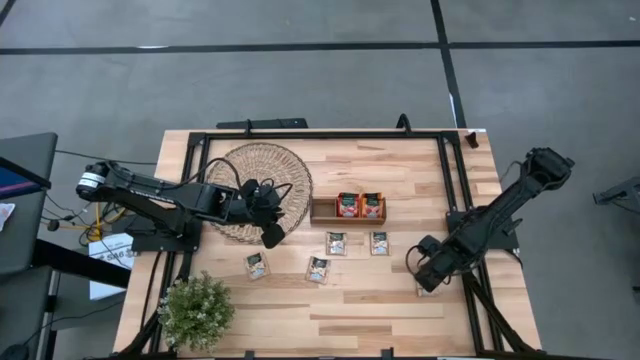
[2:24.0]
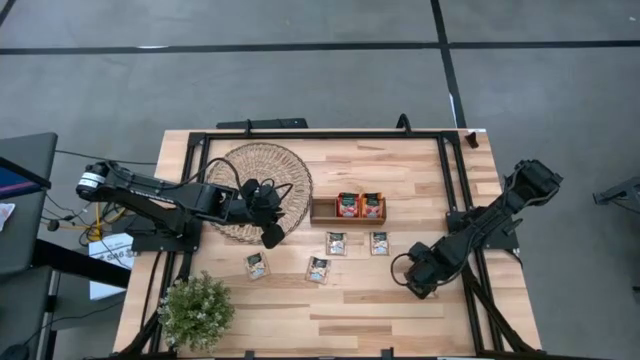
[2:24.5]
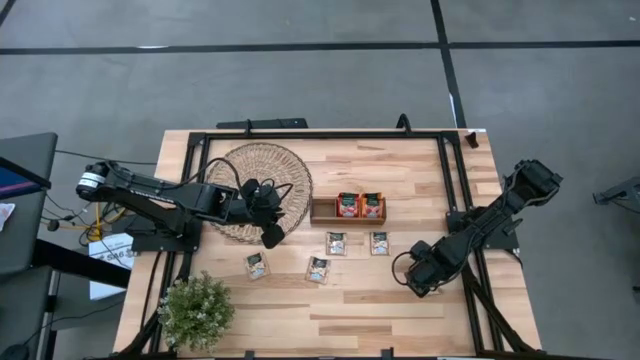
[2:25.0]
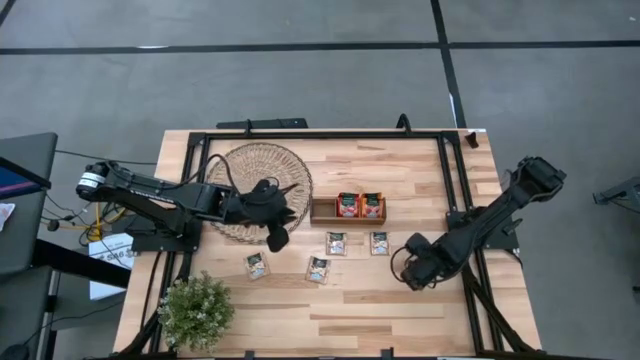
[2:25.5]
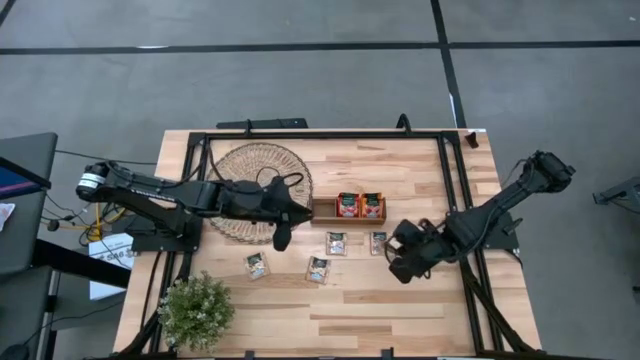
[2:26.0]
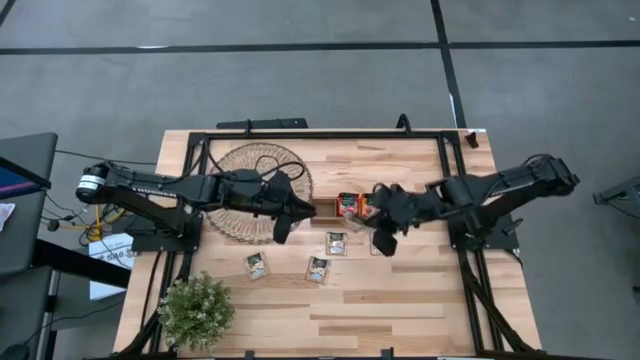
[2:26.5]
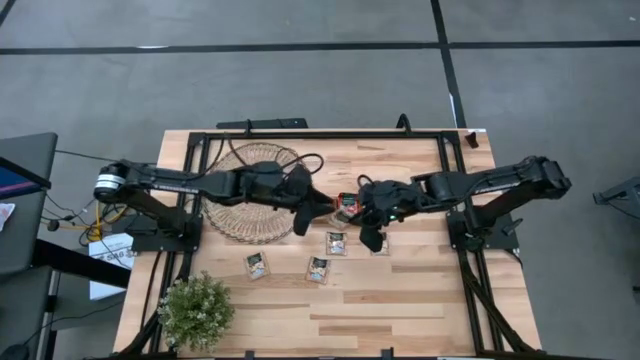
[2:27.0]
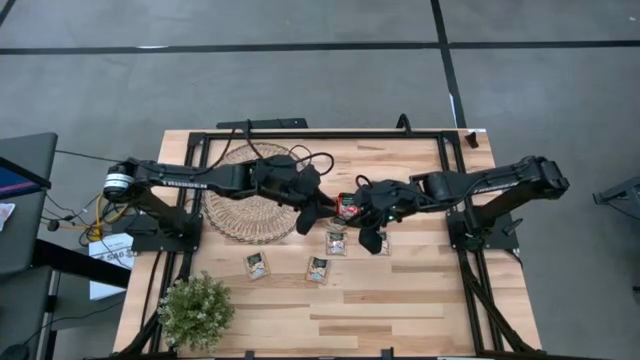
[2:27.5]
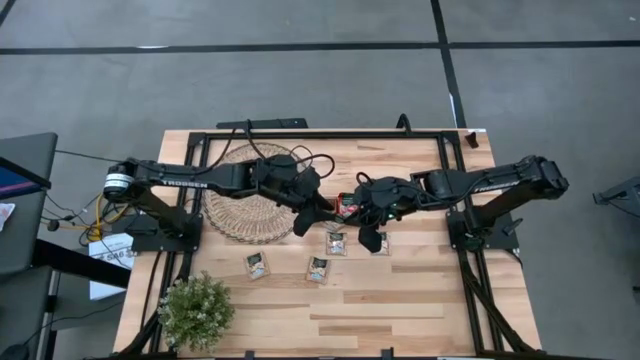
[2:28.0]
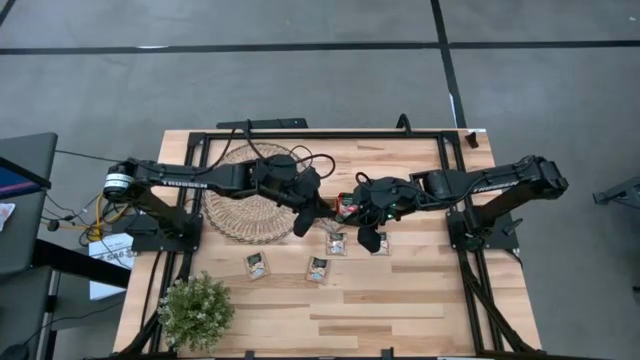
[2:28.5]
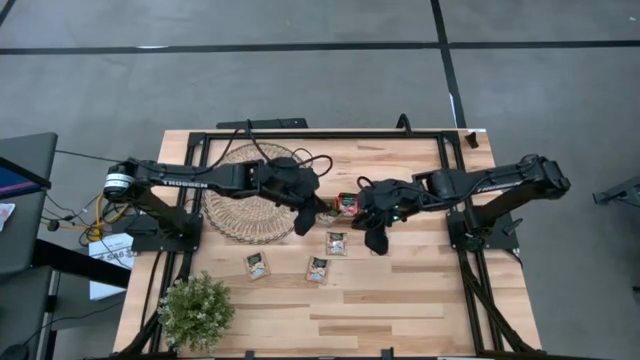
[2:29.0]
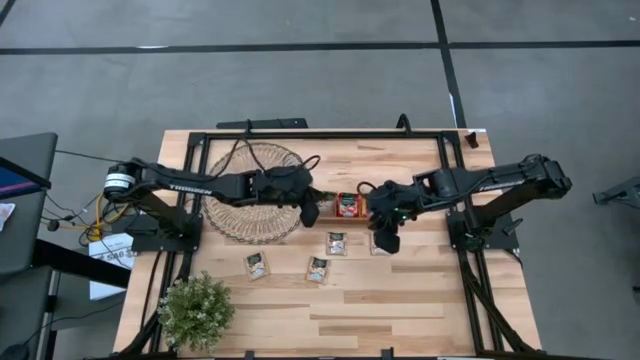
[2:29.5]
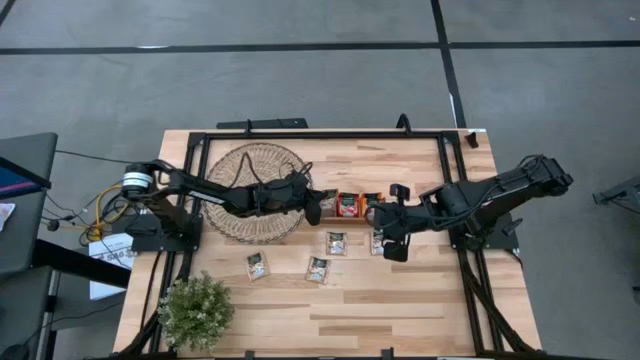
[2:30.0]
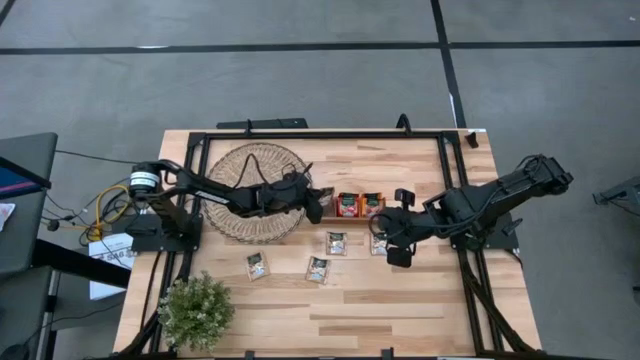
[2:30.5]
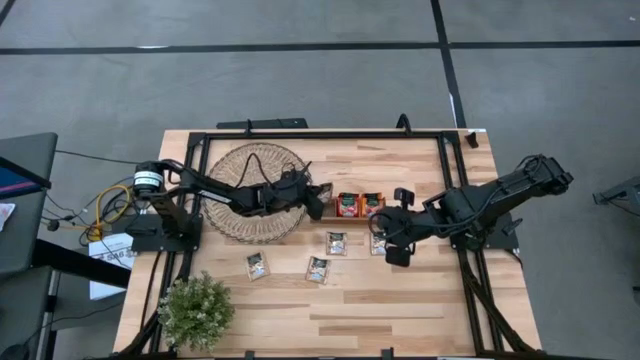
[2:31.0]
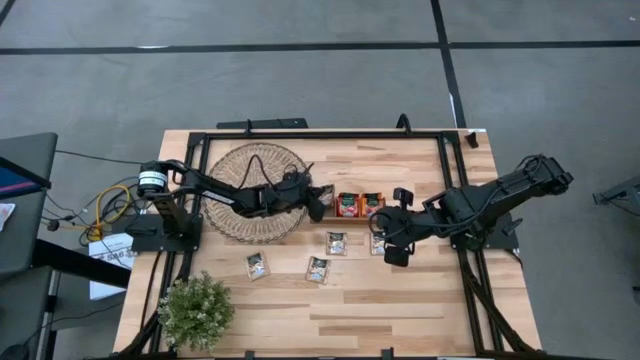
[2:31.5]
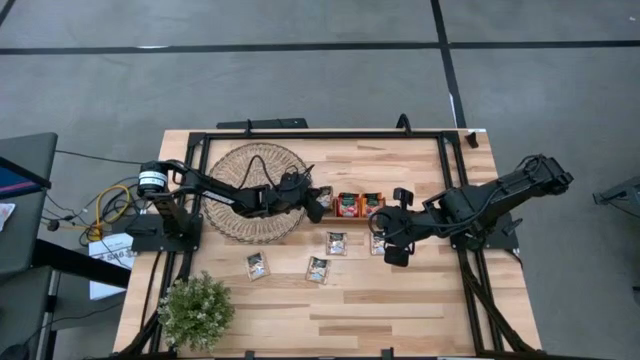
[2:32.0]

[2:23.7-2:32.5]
Task: Pick & Place Tea
Put the brown tea bag into the left section of the wooden organizer

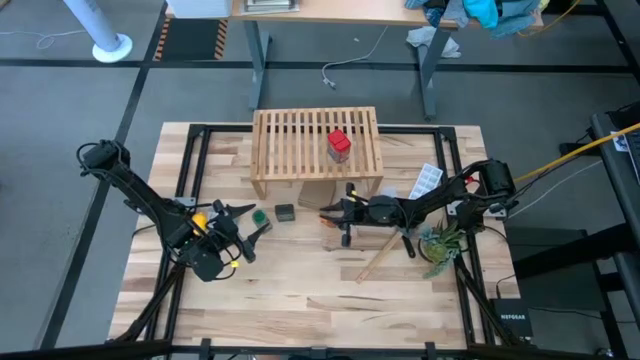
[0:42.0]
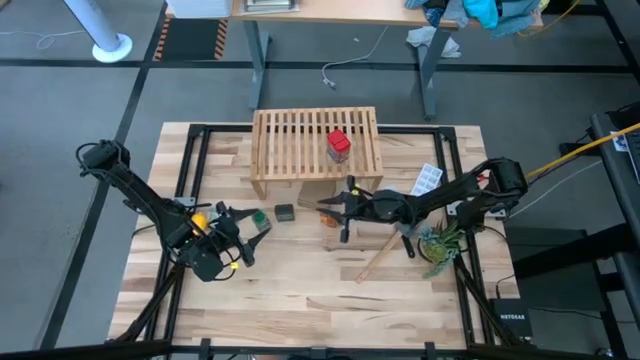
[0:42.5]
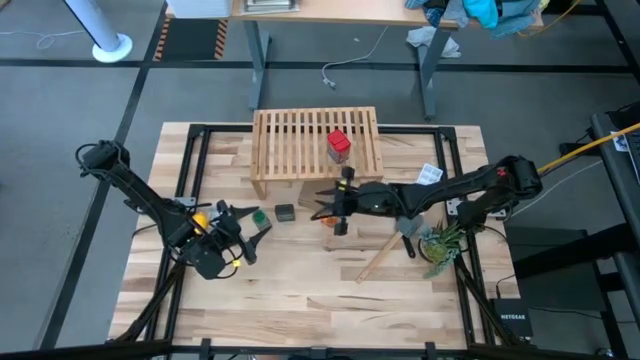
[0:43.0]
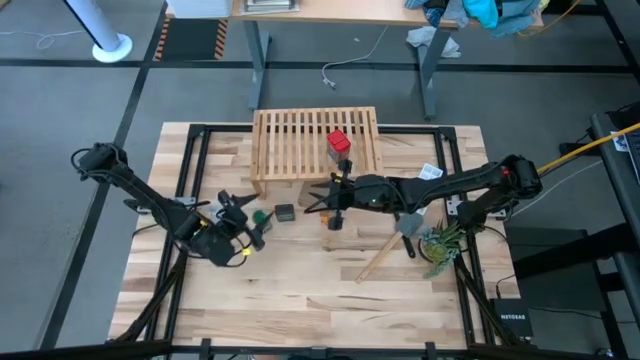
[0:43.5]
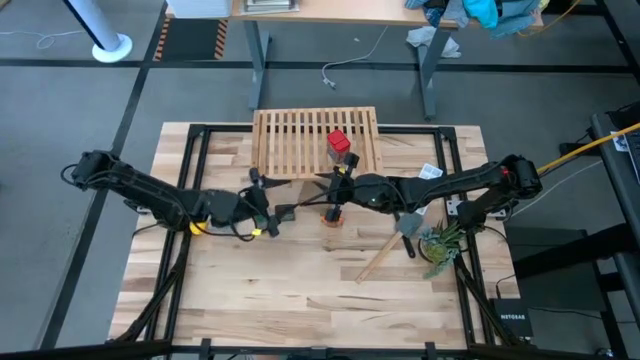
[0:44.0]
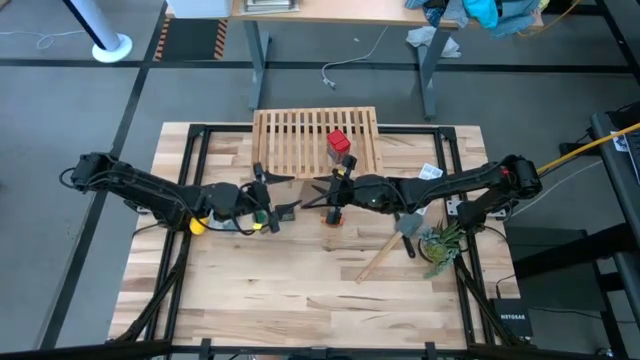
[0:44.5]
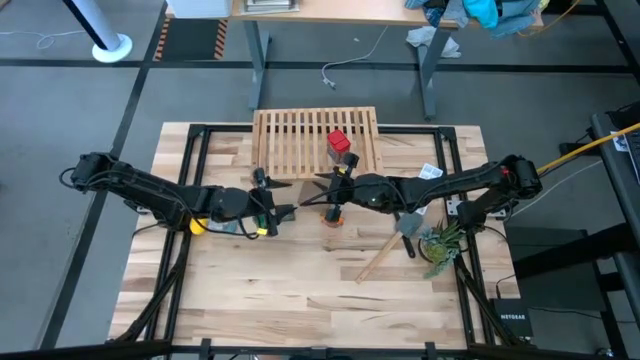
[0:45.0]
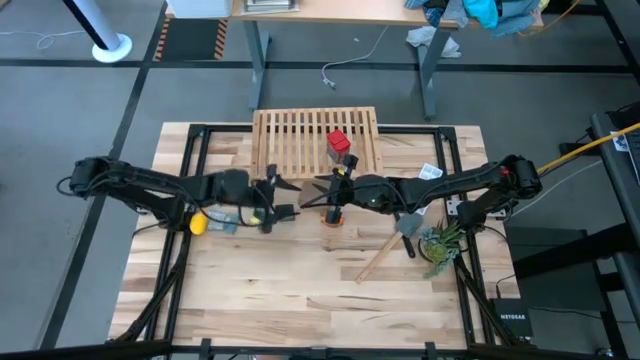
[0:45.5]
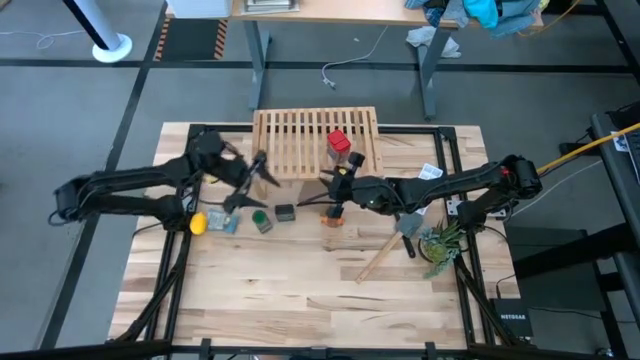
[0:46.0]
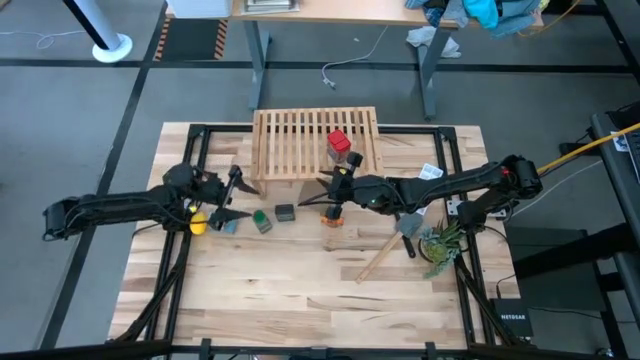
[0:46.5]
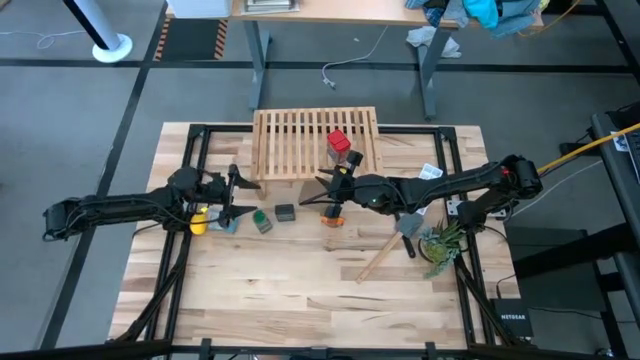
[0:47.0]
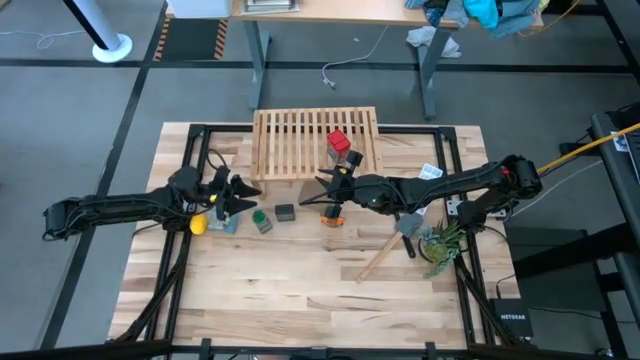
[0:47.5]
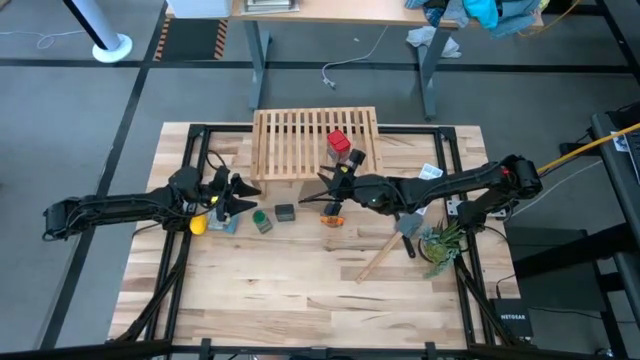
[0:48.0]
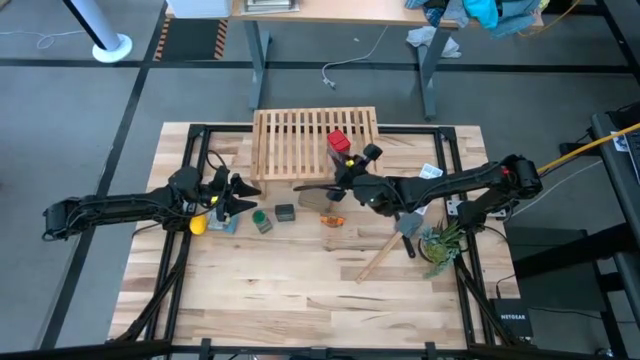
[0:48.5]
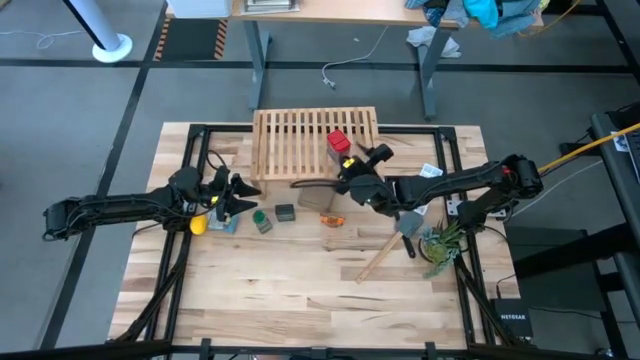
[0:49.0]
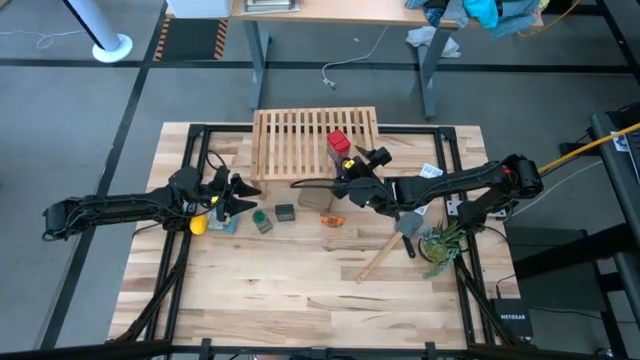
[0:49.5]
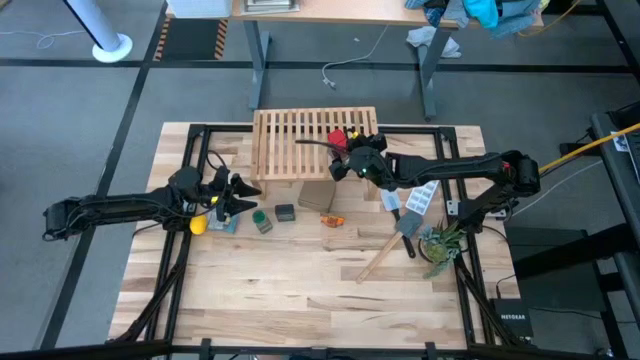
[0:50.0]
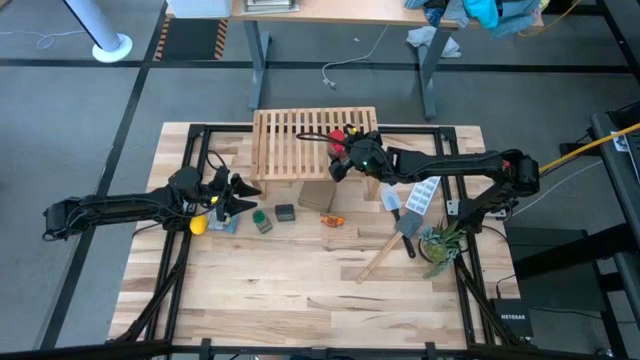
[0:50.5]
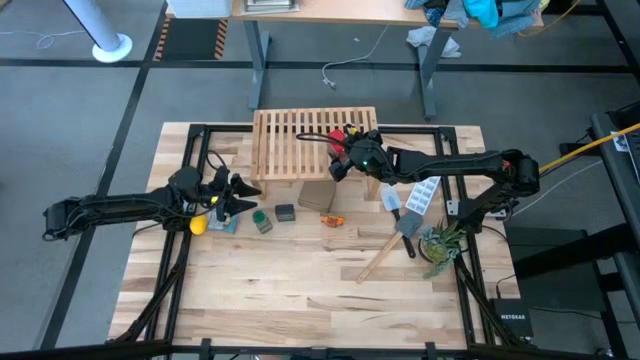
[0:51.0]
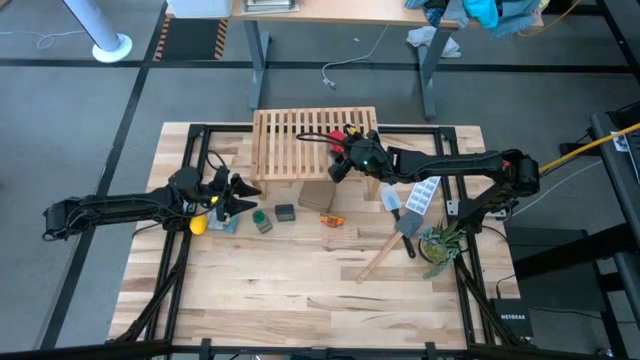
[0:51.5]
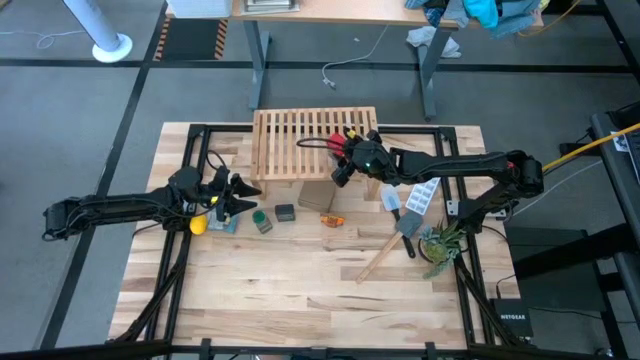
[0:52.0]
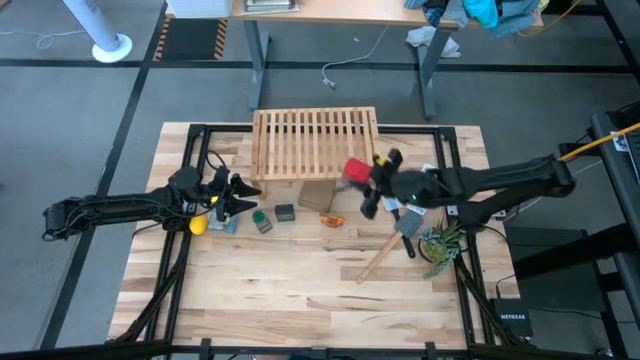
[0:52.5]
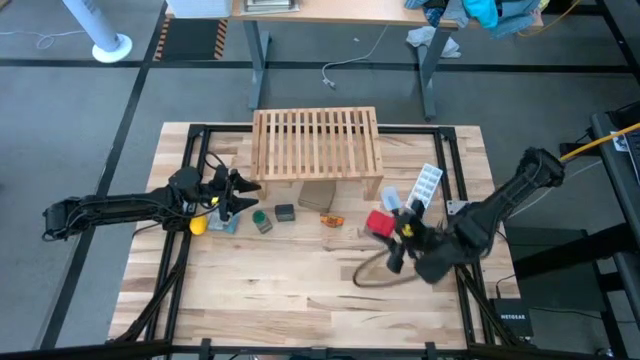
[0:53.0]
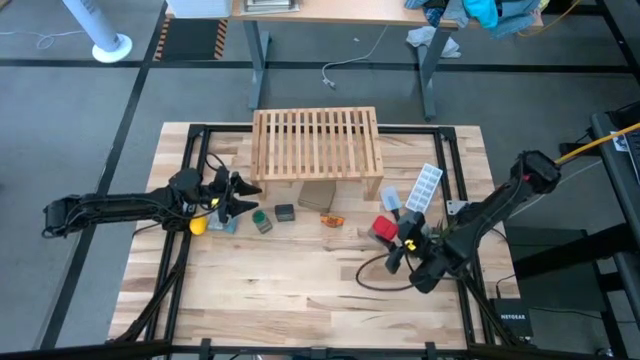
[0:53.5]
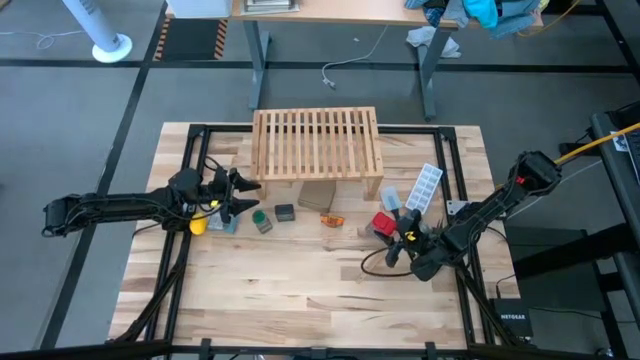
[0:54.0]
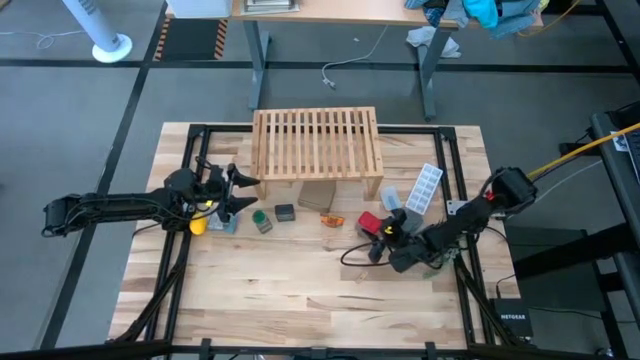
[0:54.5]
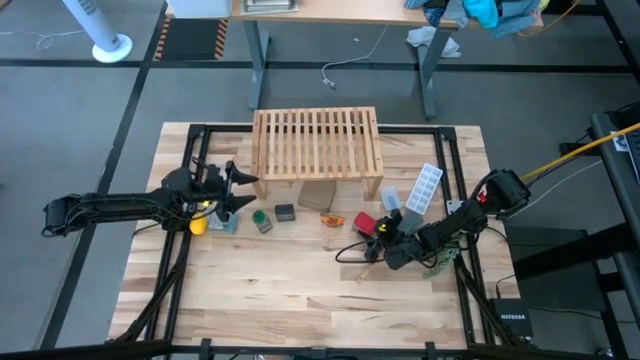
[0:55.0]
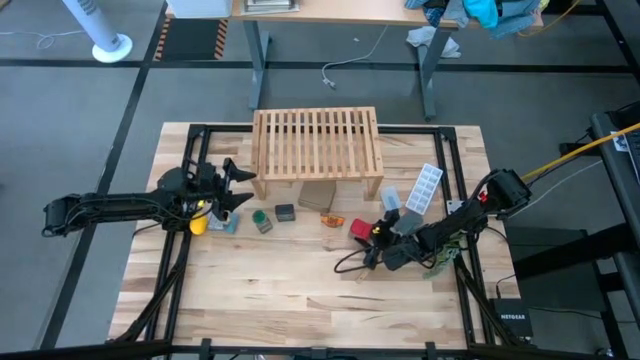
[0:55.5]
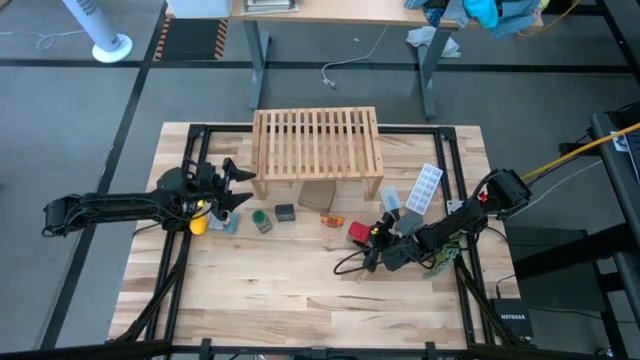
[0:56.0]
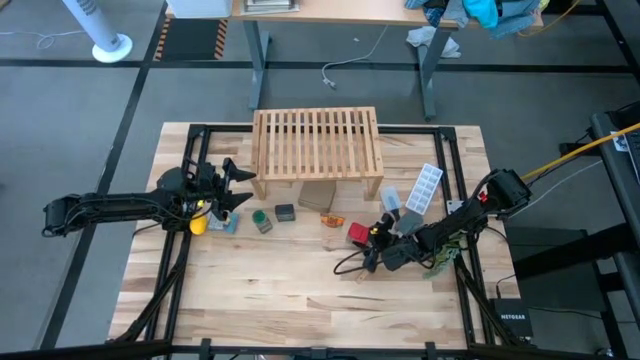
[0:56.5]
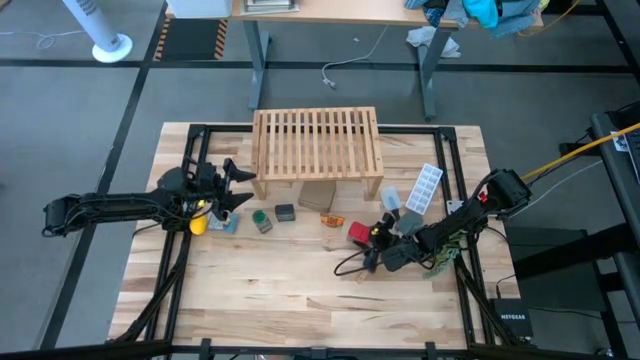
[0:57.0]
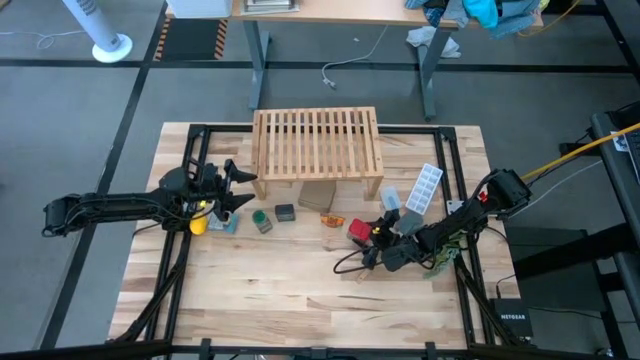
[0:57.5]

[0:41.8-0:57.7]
Task: Shelf spices
Remove the red seasoning can from the shelf
